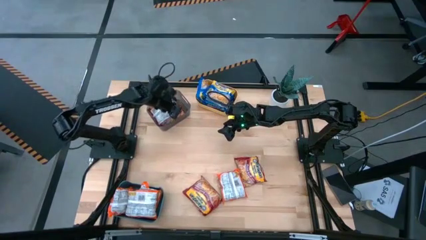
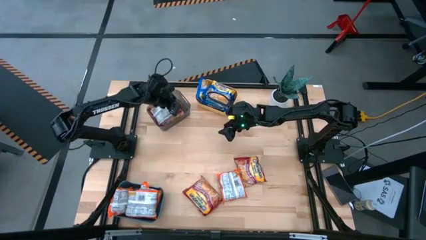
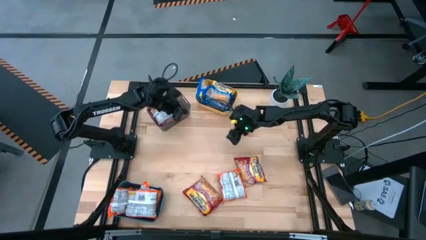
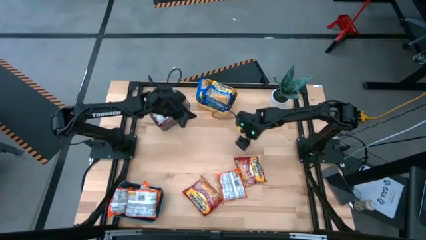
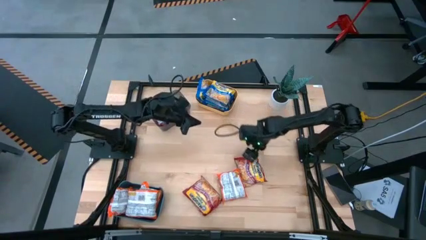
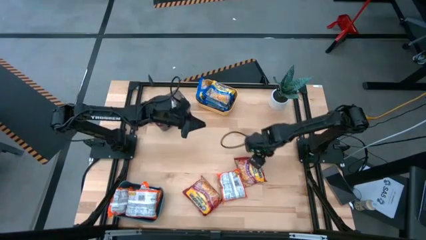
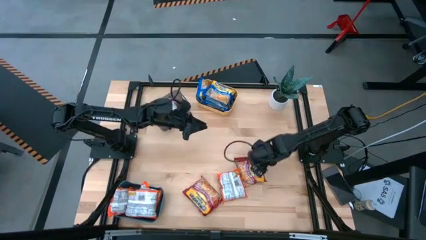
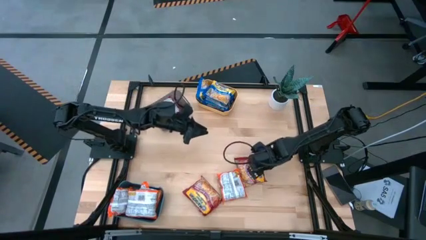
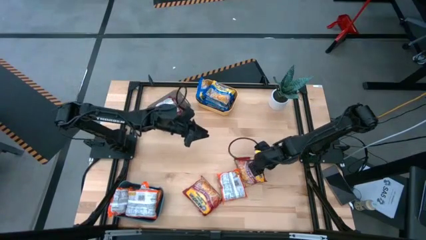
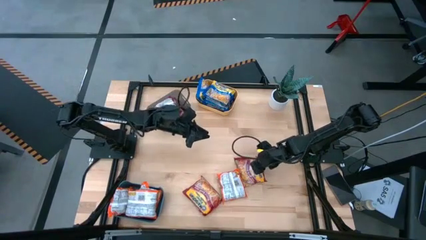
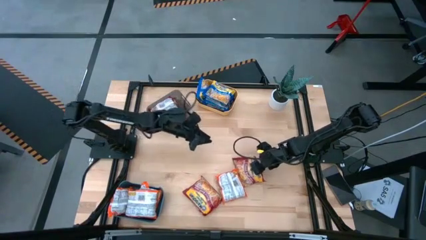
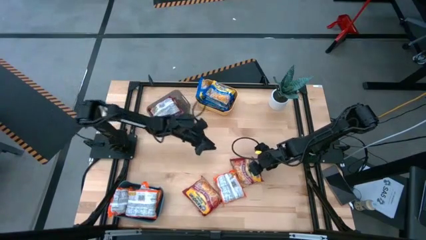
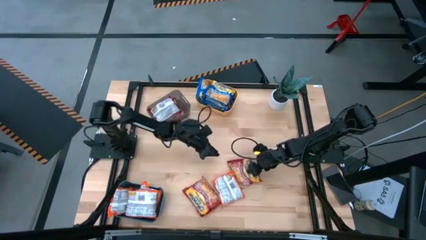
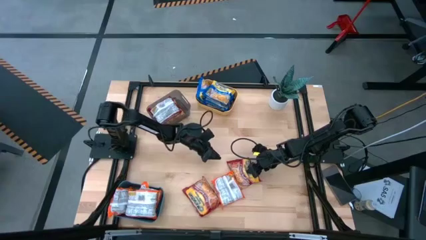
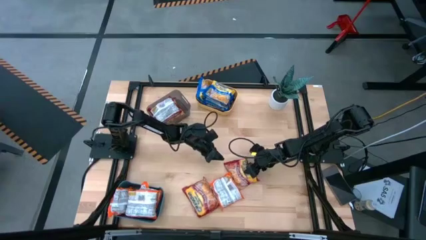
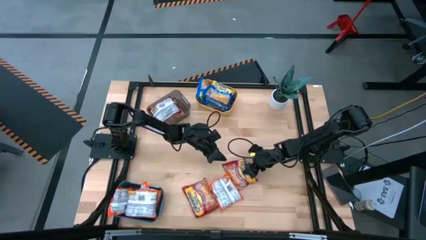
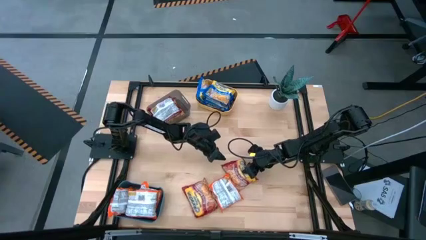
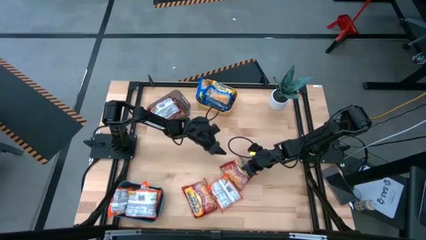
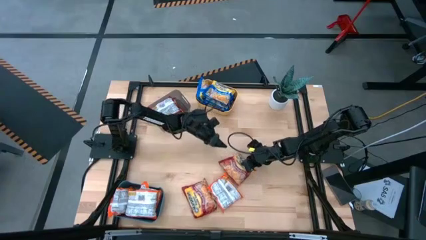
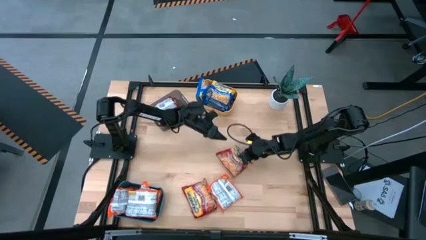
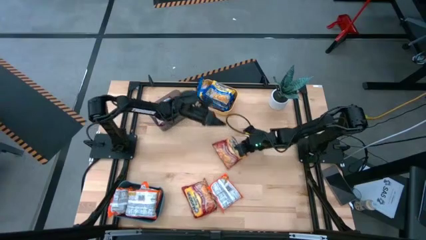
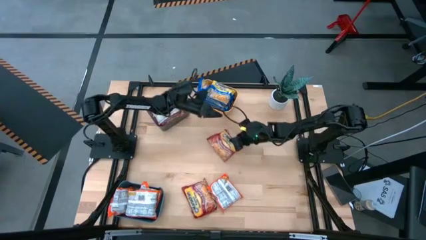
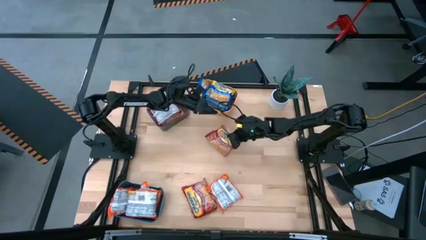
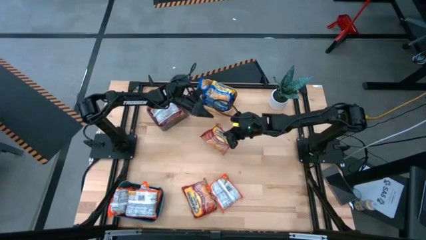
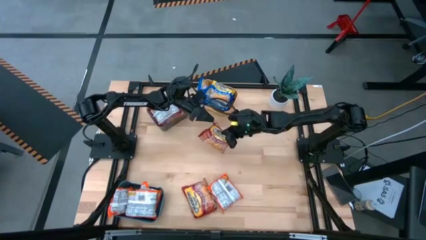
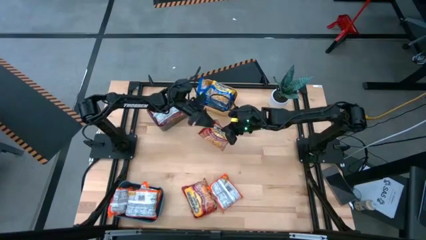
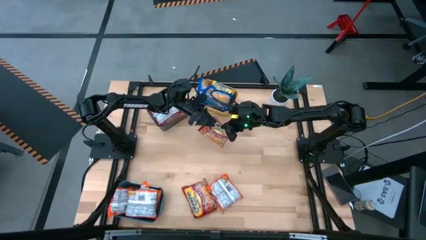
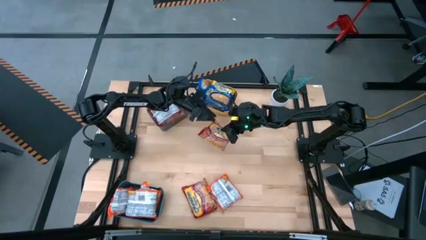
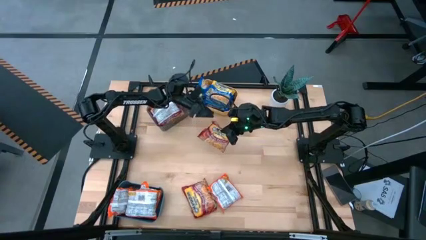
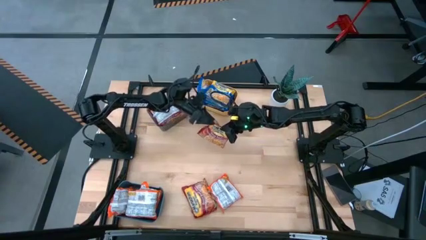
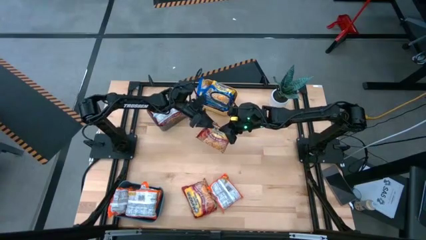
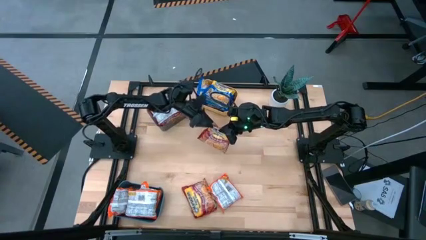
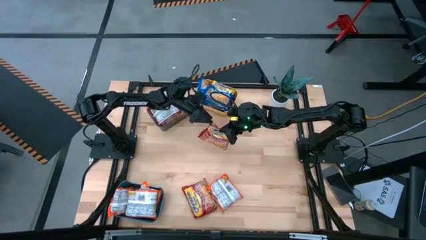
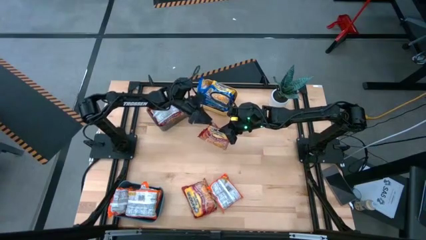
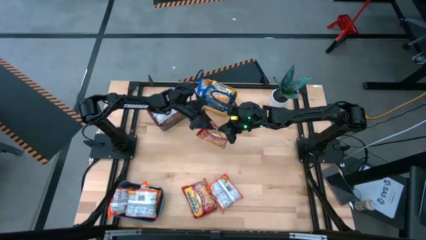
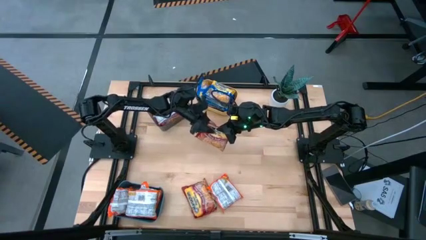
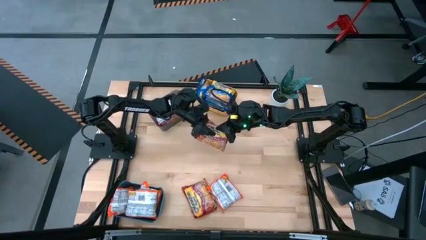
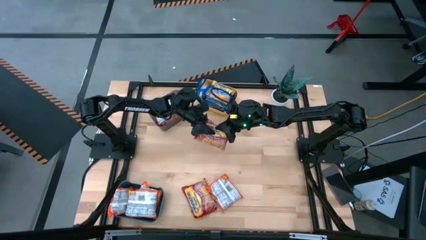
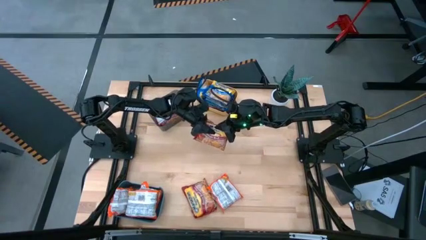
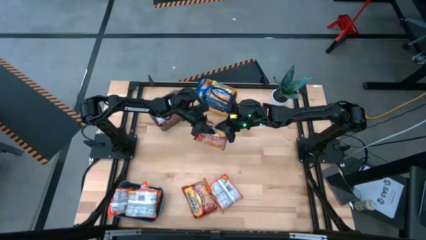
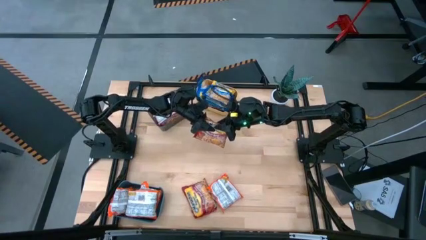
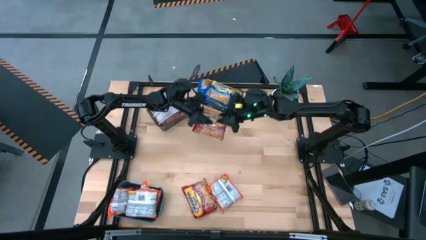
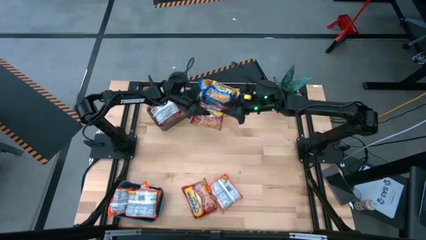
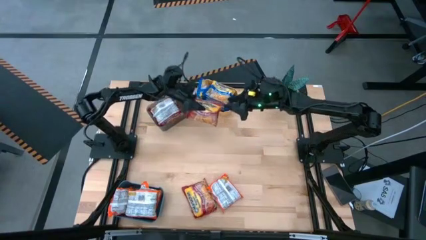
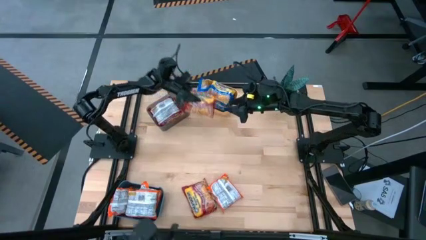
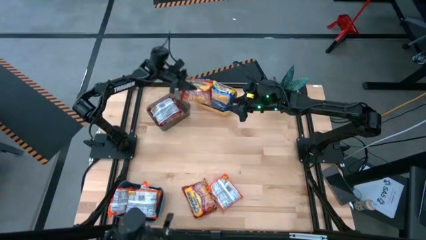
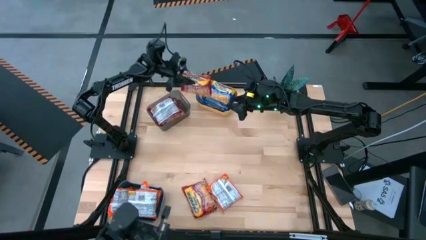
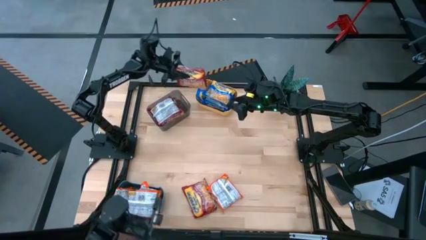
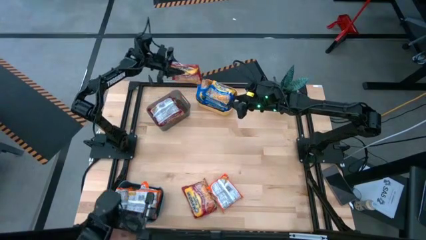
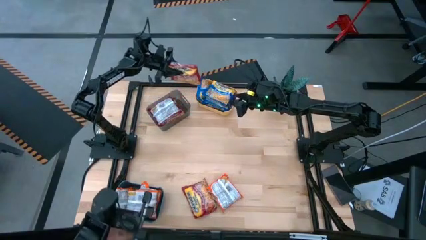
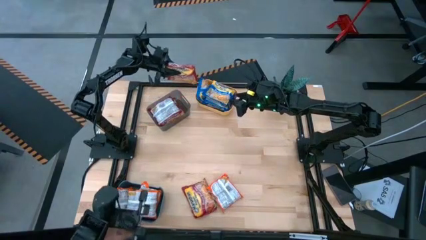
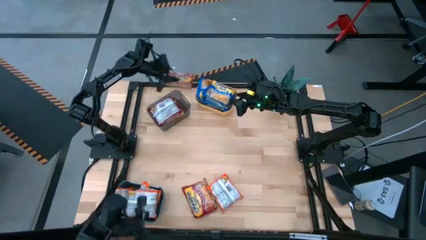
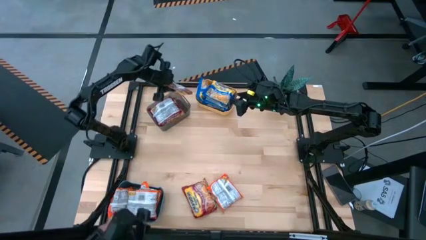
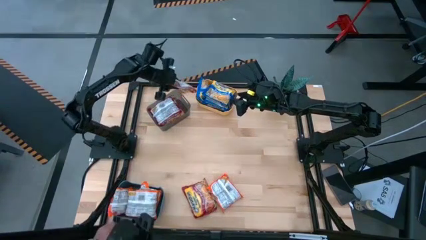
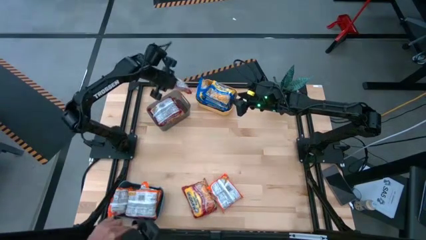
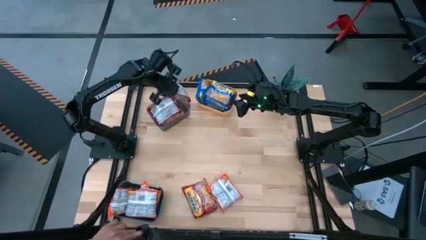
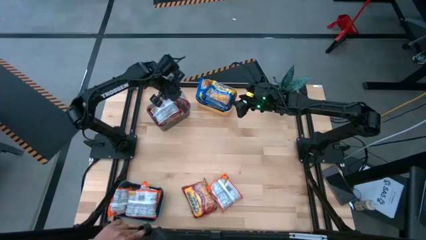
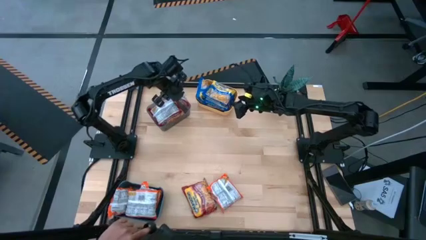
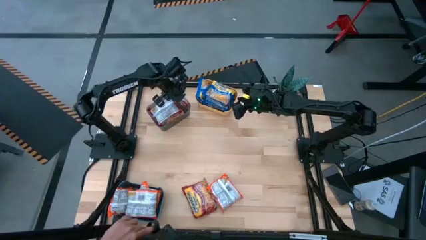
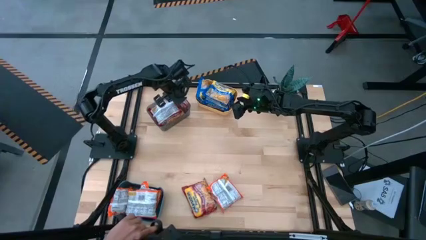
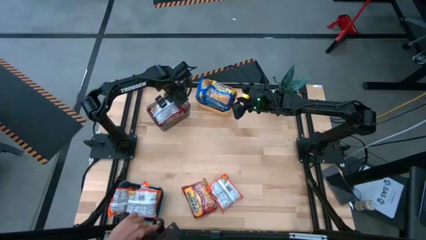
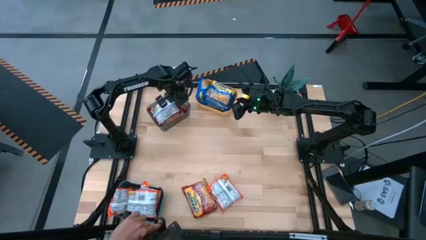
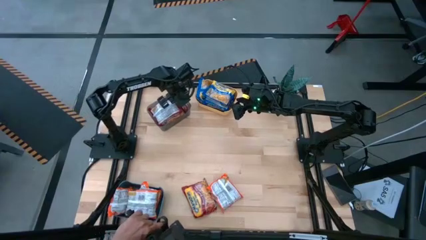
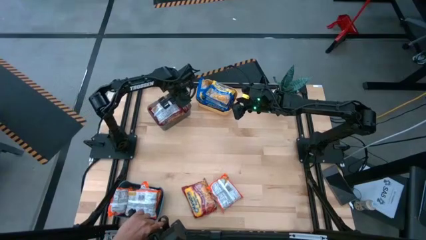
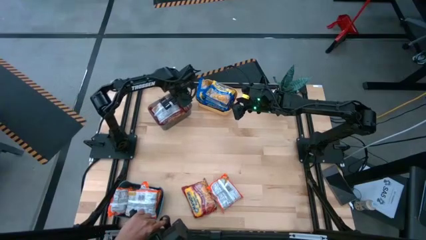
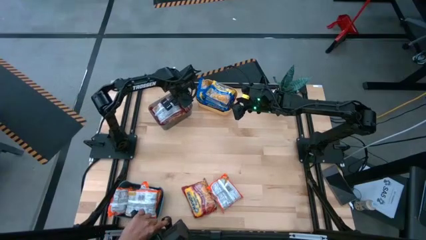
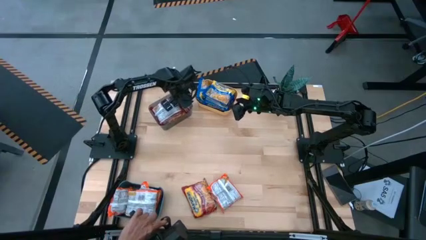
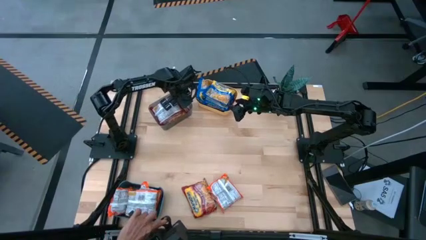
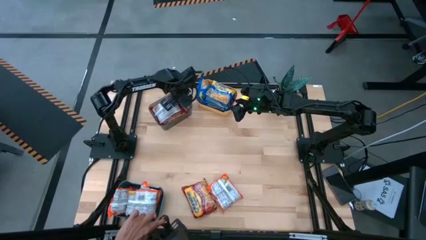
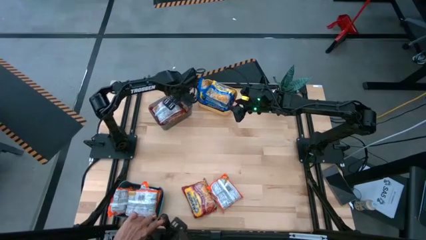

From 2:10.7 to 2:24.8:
Task: Sort Maruchan noodles
Put the red noodle pack into the gray bin

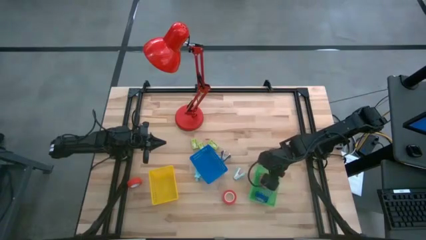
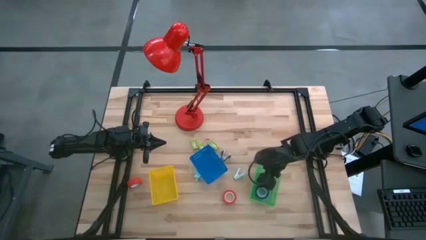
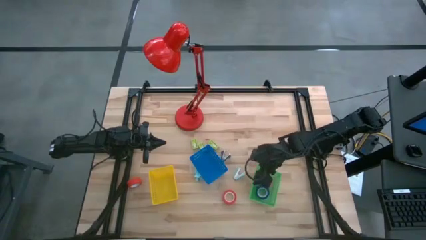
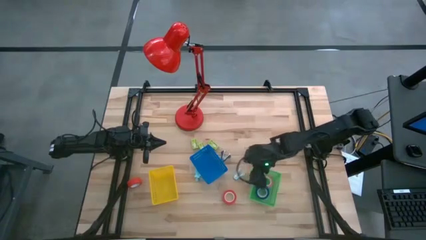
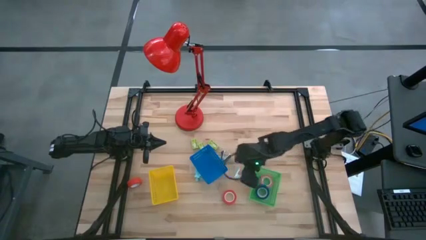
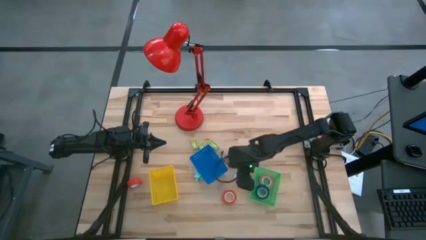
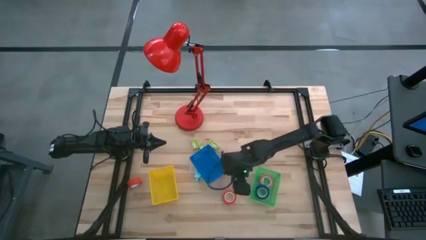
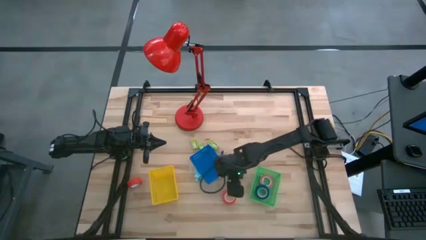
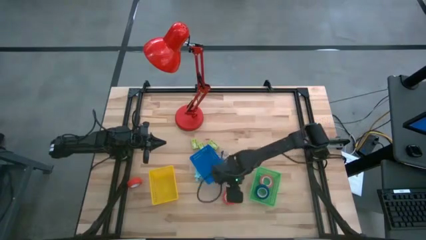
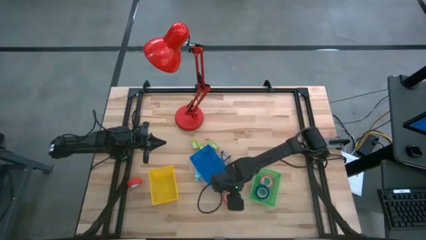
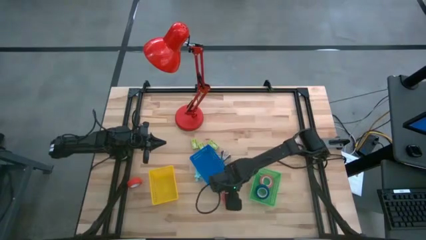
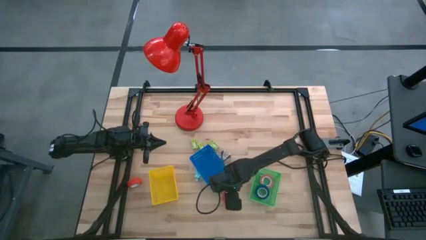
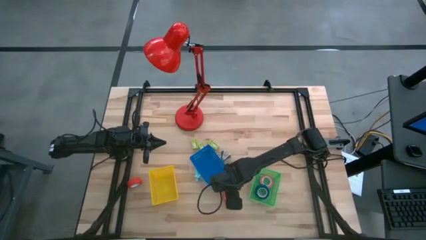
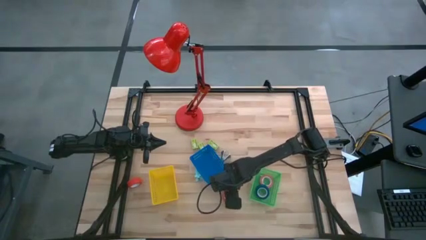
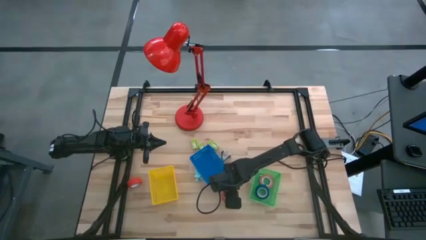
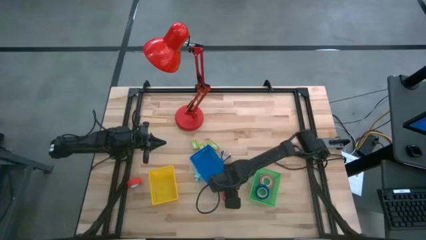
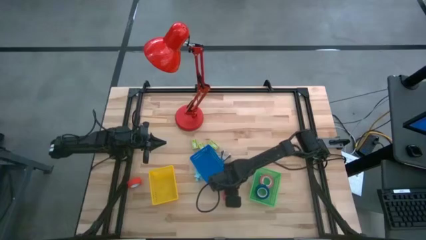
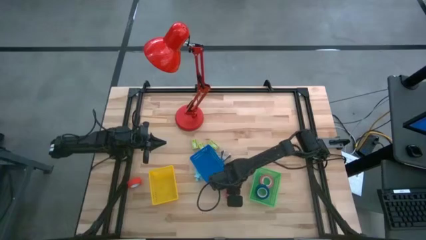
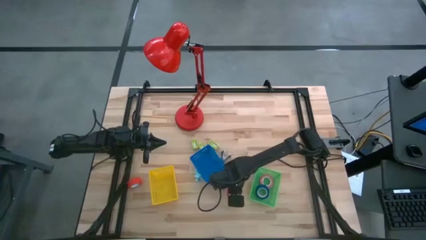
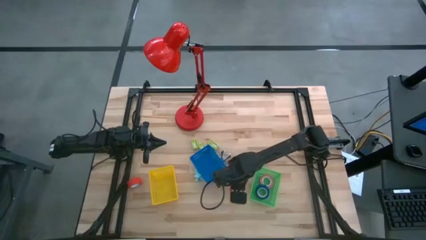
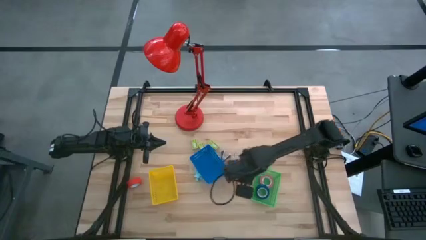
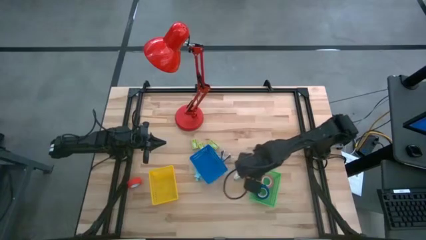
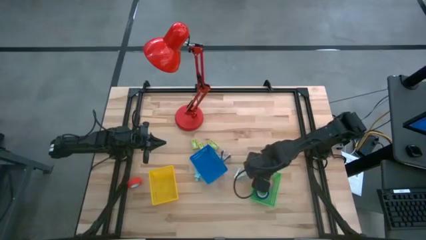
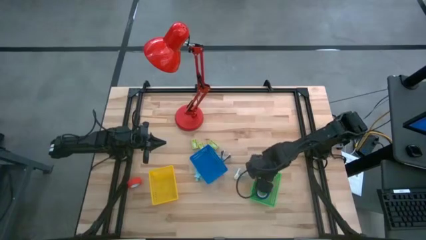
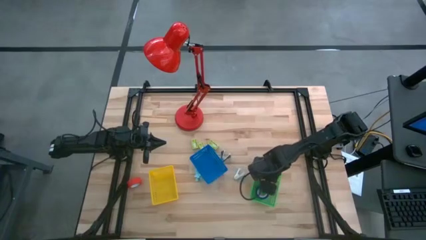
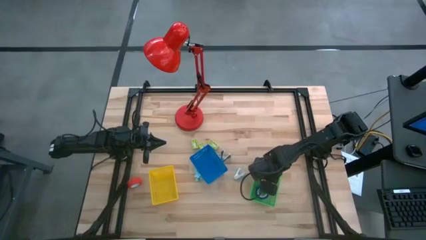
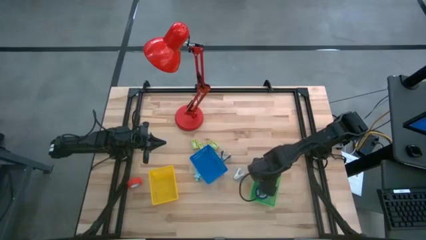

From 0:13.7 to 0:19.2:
Task: Pick and place Stapler, Stapler remover, tape
Put the right orange tape into the green bin
